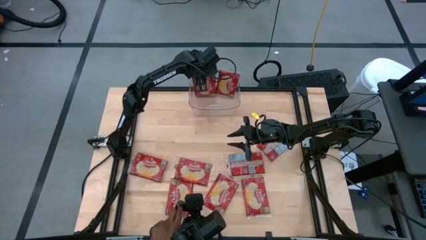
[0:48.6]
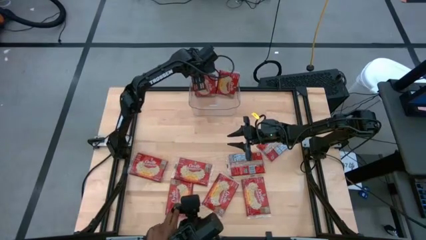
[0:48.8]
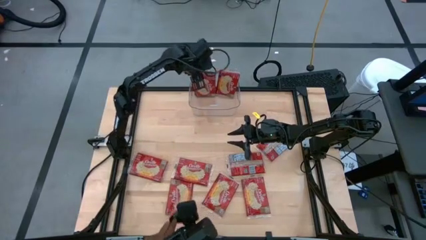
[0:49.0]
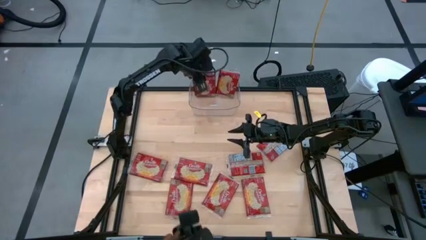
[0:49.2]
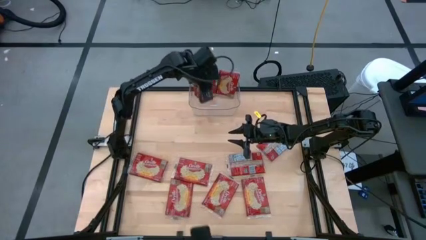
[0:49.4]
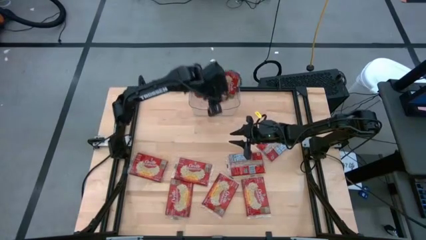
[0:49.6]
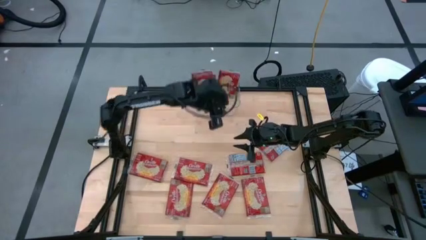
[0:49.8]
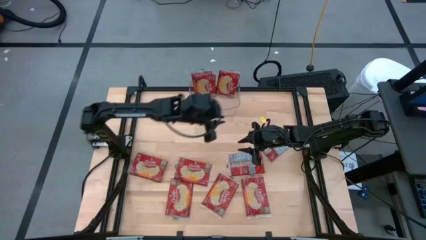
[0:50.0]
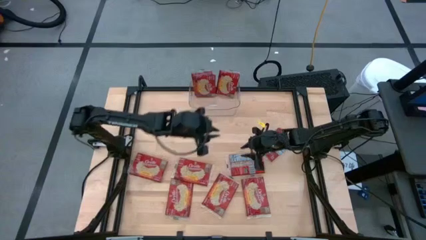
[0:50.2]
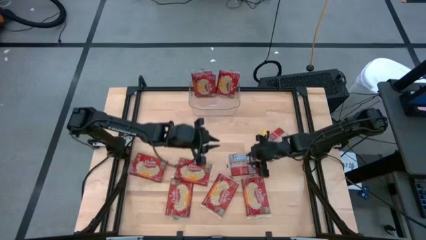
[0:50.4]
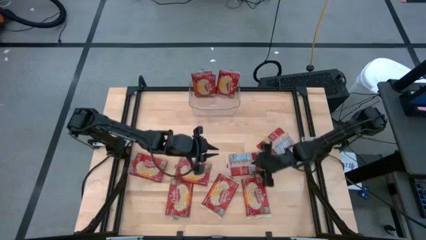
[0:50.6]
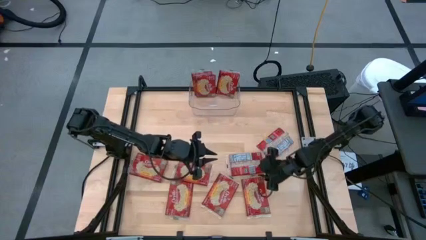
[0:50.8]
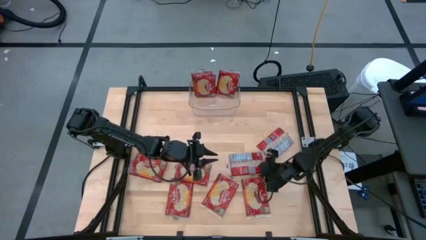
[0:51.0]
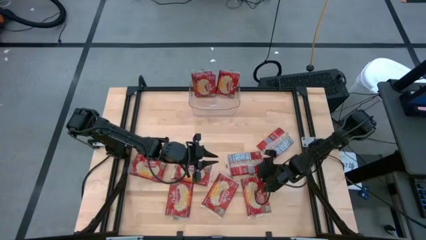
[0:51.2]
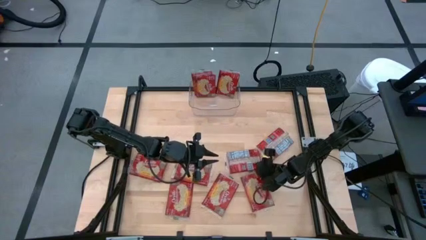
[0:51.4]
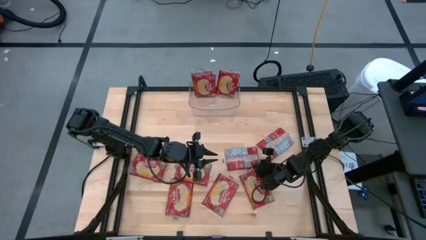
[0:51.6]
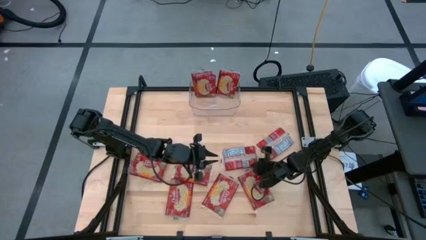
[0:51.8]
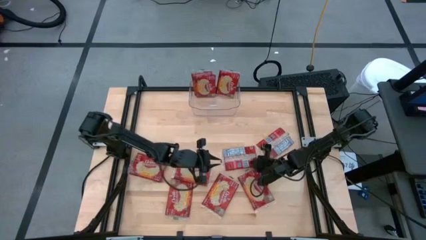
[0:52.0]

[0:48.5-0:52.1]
Task: Sort popcorn bags into baskets
Put the red popcorn bag into the transparent bin

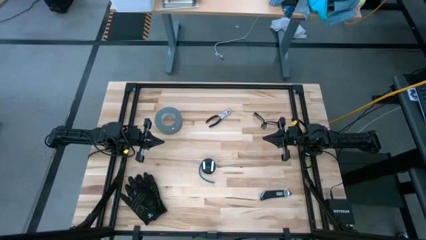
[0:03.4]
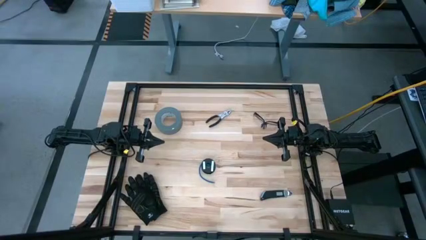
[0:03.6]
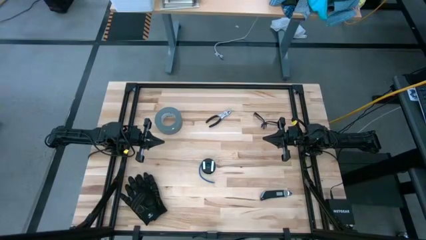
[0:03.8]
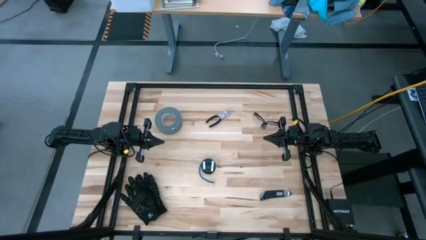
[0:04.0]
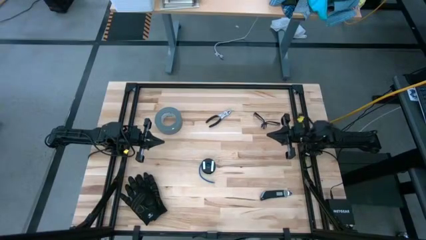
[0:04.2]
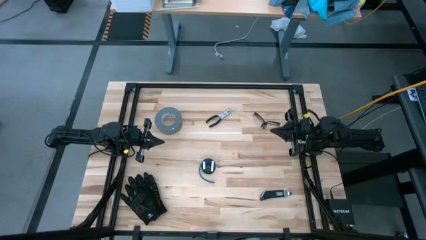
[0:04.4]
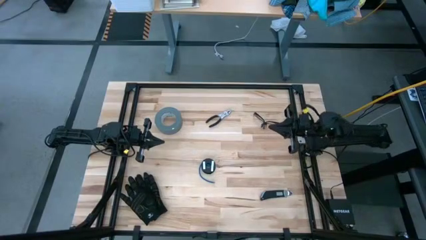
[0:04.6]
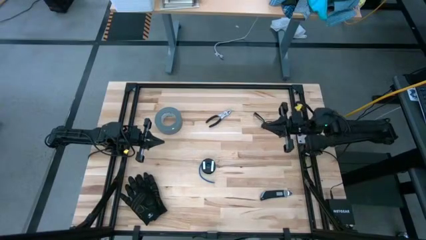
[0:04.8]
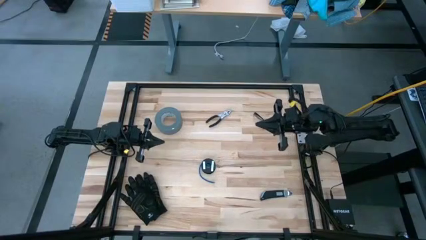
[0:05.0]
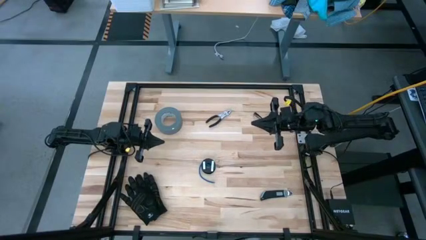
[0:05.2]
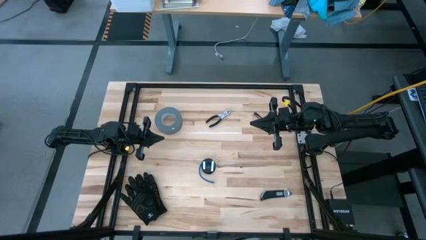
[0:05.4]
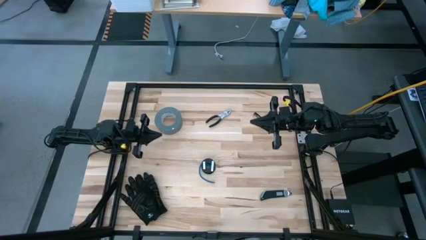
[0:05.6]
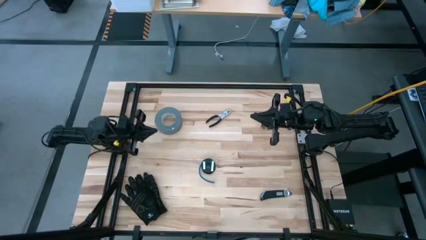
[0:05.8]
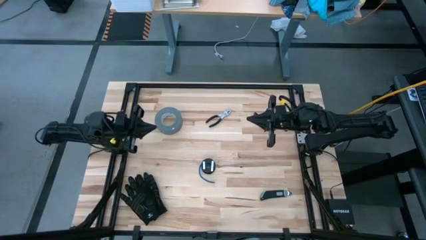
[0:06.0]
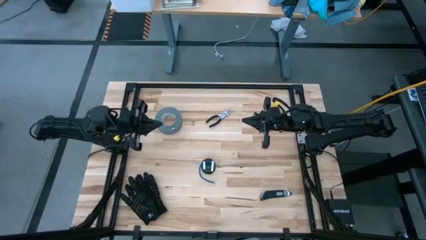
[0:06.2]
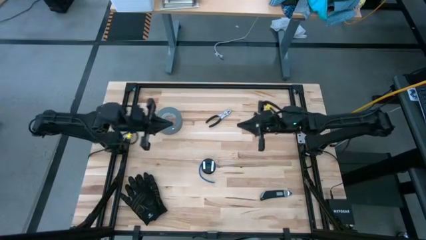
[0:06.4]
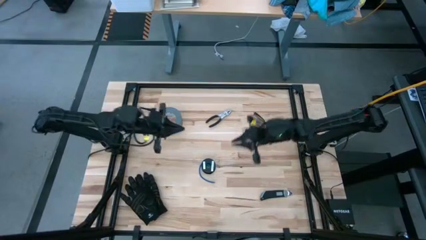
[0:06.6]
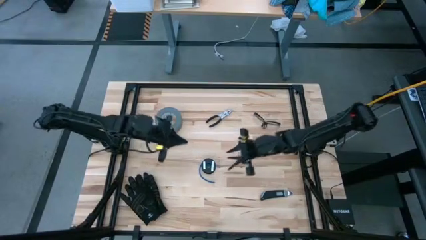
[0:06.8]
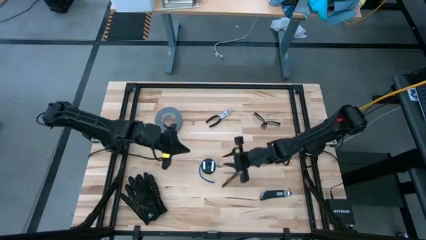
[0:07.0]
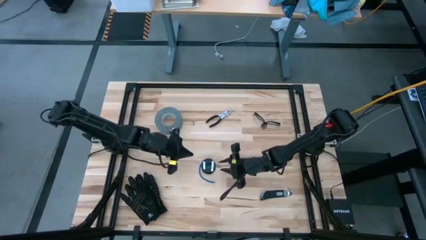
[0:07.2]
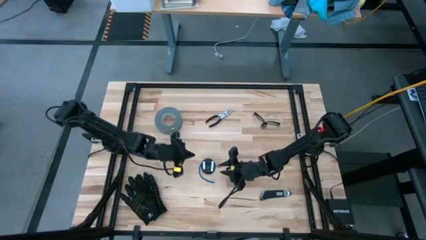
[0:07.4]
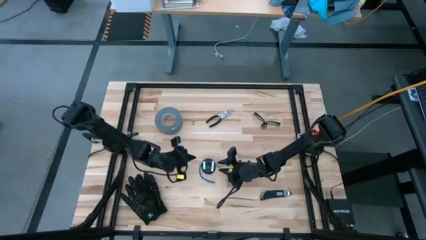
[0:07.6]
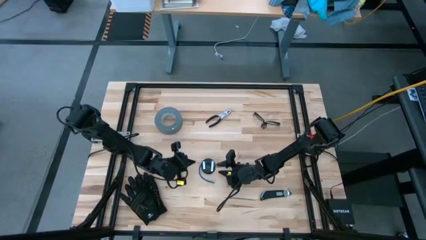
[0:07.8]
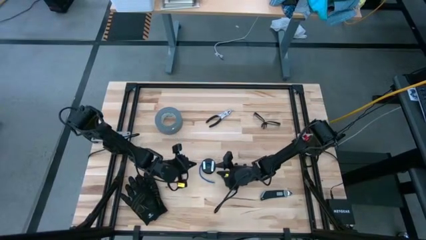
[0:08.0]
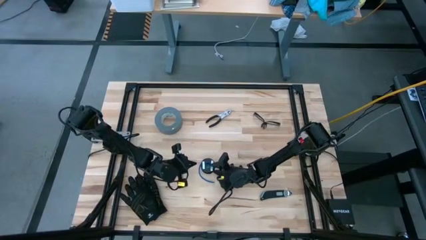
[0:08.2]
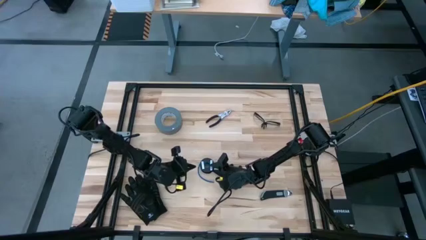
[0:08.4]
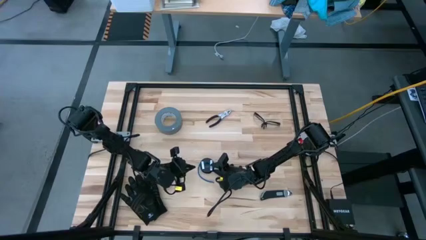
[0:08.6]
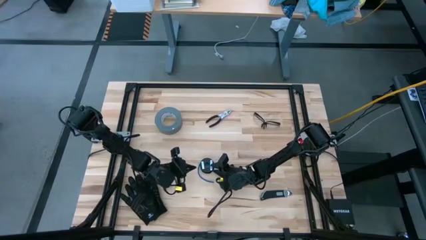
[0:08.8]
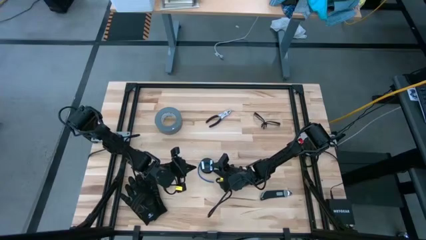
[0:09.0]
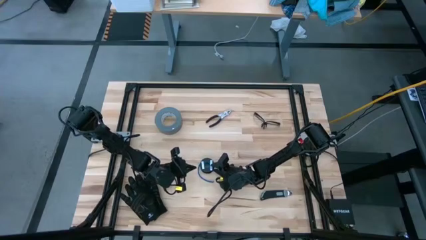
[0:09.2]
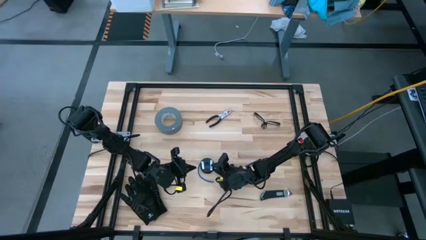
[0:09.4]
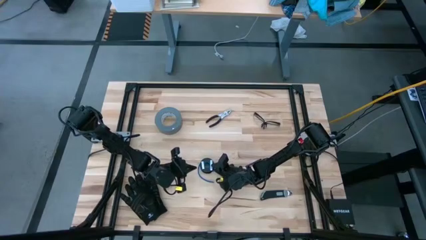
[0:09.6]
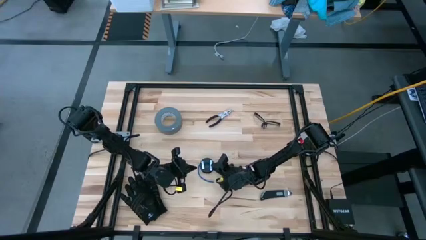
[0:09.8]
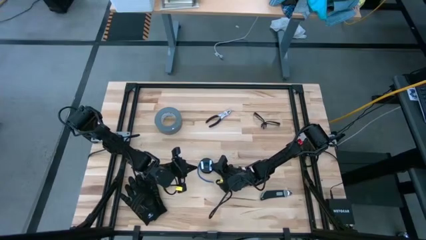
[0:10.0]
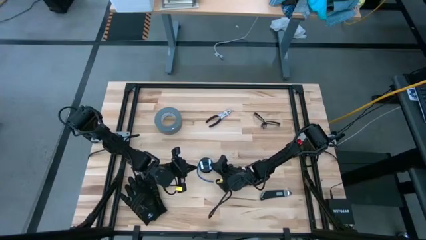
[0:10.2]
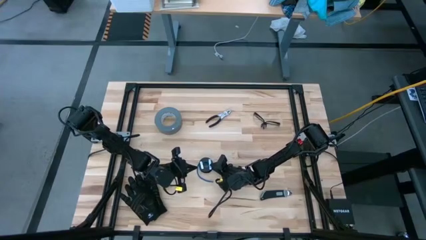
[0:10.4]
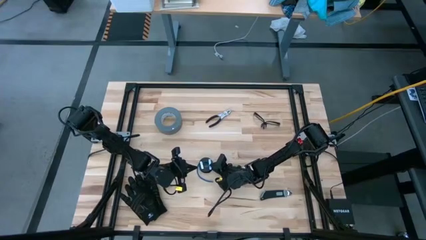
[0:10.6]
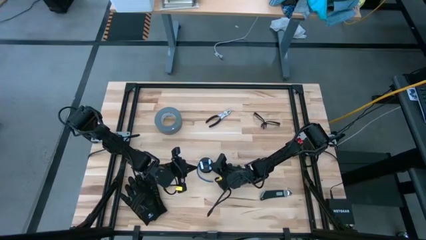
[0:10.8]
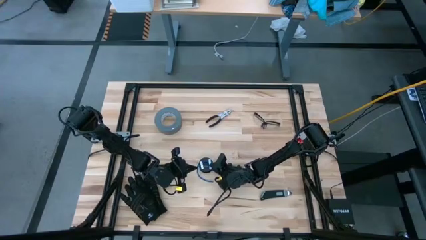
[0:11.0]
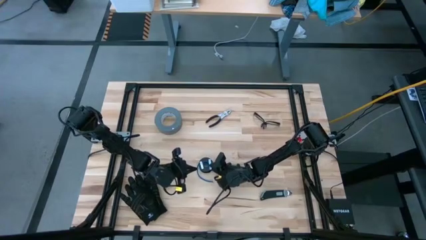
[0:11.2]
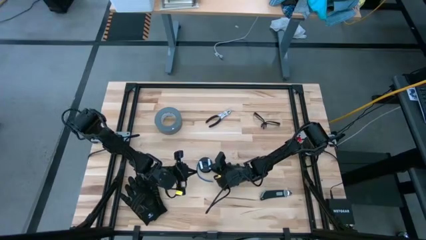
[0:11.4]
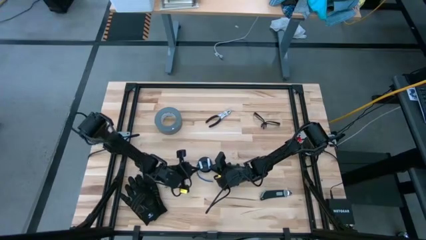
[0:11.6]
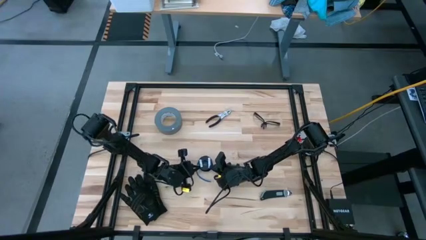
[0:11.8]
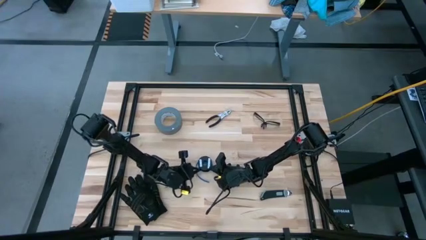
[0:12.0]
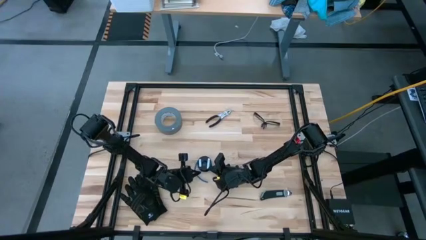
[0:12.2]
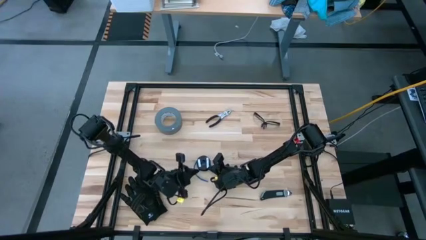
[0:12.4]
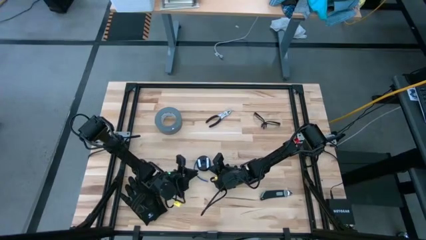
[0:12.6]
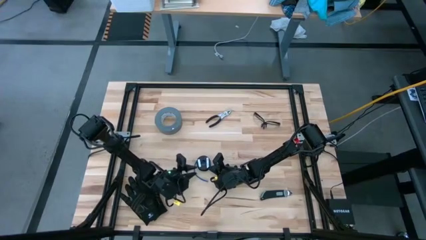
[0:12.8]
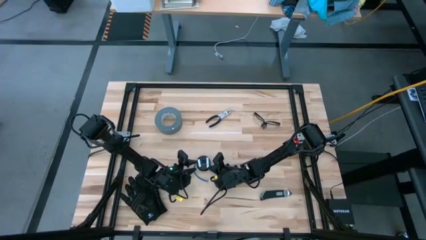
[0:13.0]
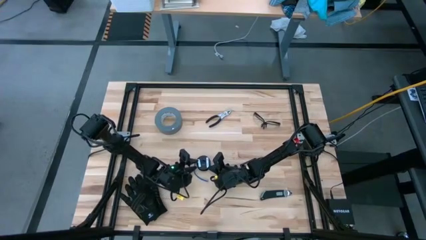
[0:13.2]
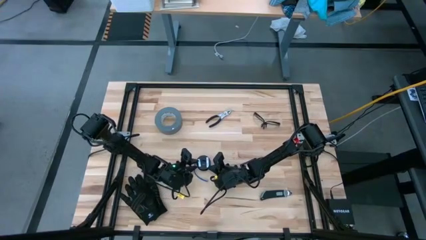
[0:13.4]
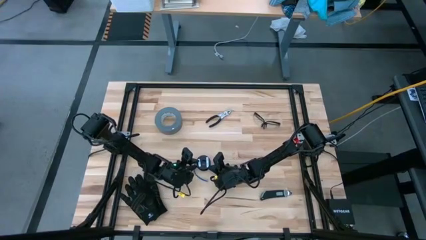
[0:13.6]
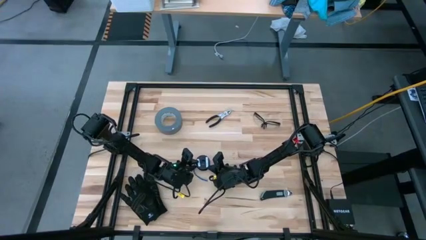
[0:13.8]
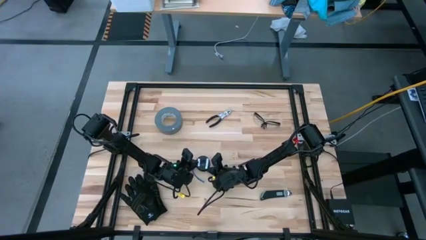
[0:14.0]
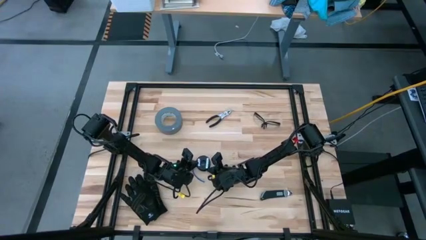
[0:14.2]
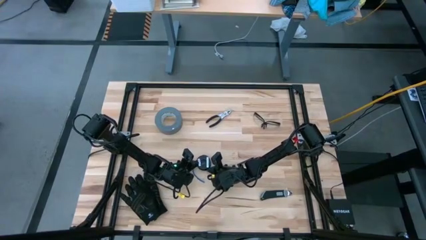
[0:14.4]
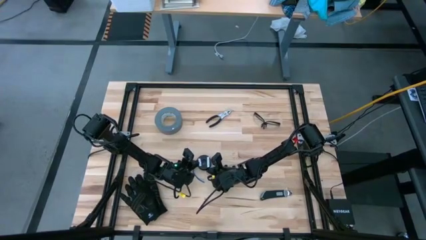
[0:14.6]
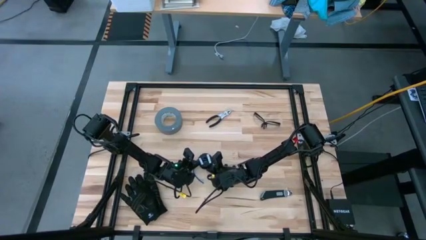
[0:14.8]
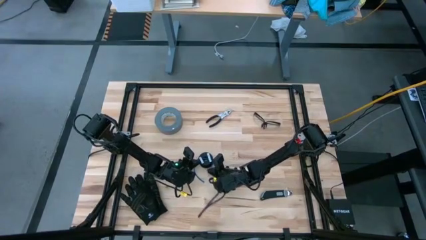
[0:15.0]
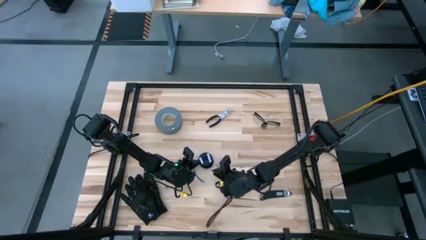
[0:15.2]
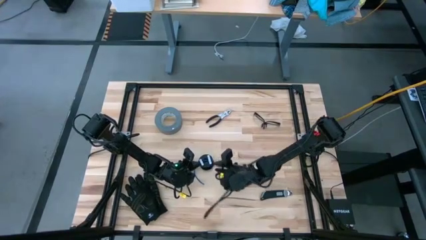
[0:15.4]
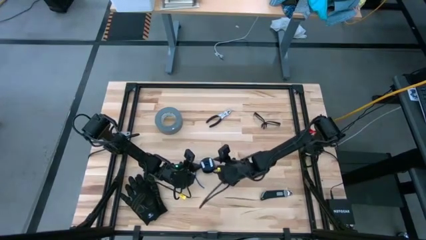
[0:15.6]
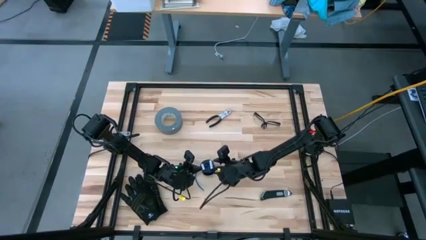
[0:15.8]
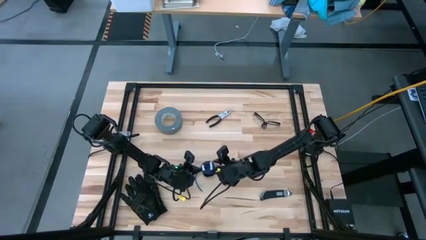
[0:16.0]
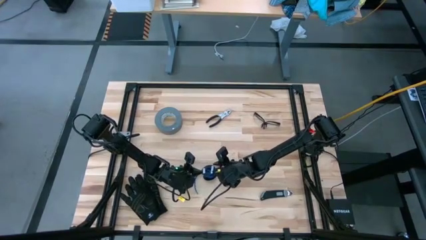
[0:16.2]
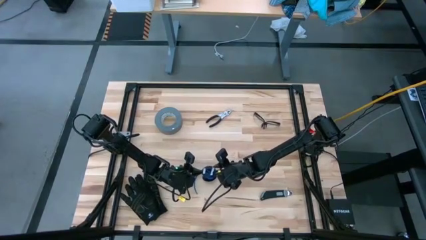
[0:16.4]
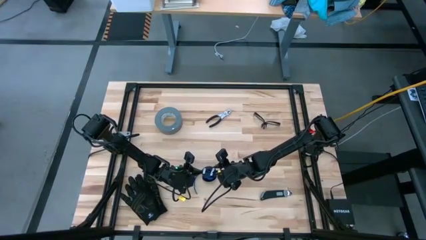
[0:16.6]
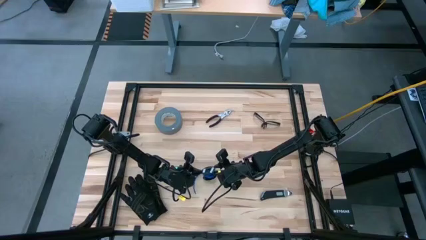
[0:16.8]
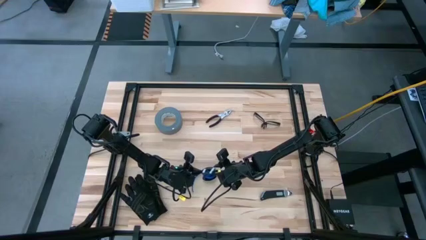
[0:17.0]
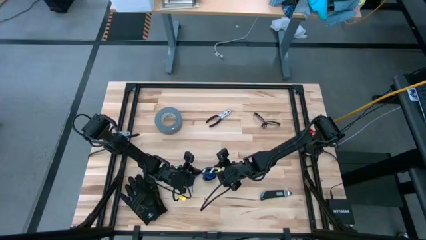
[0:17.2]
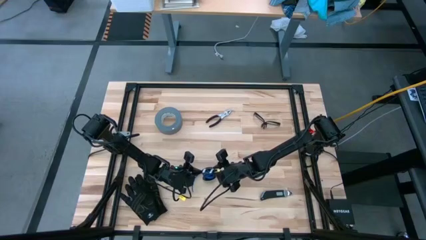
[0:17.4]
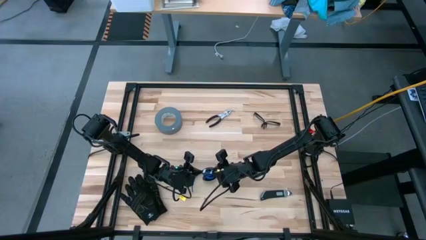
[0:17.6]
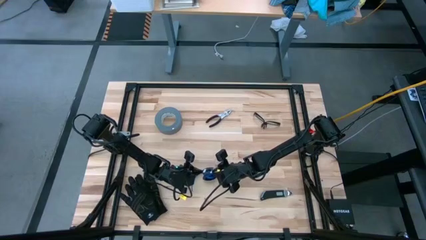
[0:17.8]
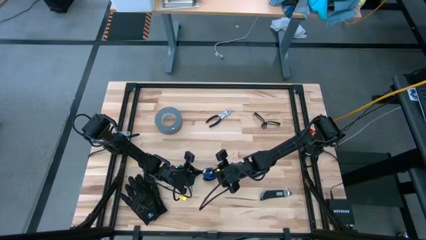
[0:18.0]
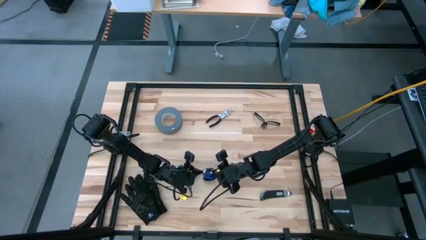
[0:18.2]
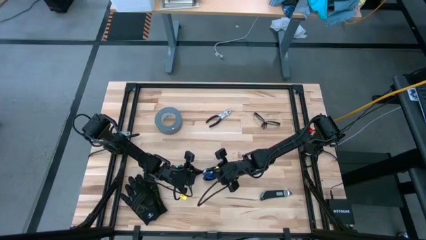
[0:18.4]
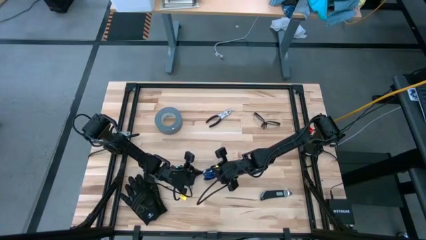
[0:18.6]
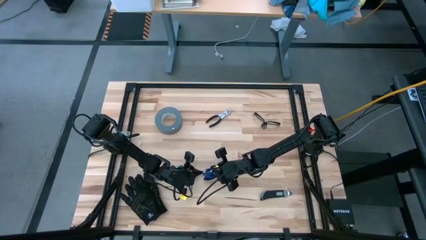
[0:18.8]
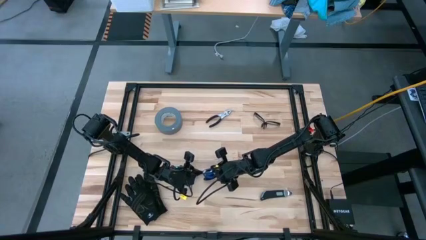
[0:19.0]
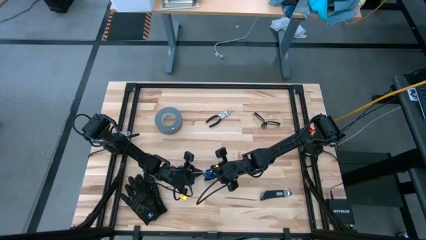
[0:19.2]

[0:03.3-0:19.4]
Task: Coil cords
Uncoil the blue wire cable from the black spool
